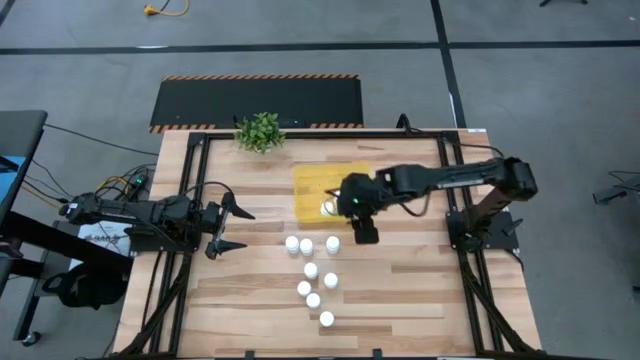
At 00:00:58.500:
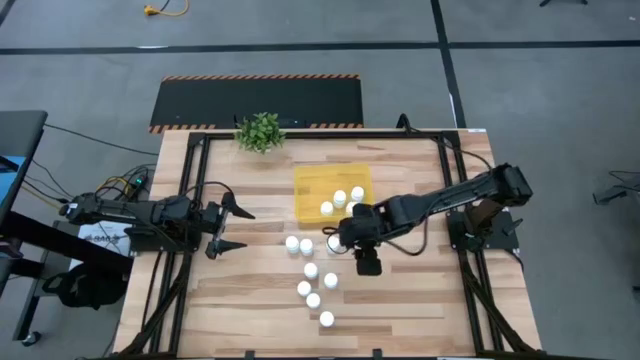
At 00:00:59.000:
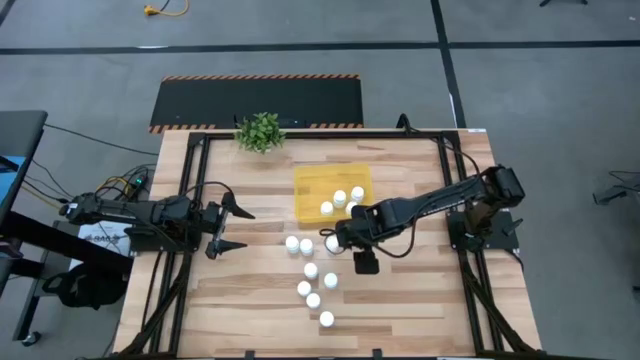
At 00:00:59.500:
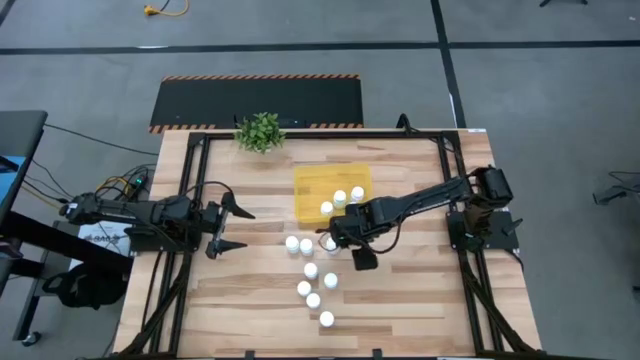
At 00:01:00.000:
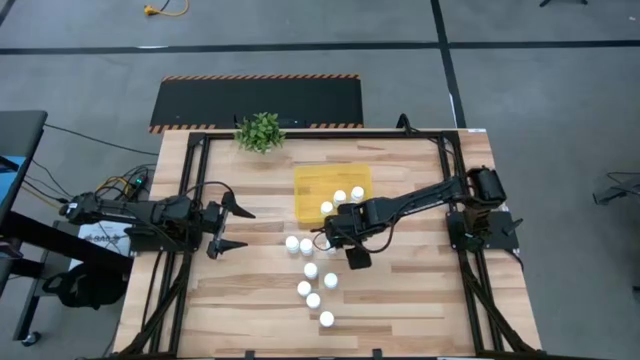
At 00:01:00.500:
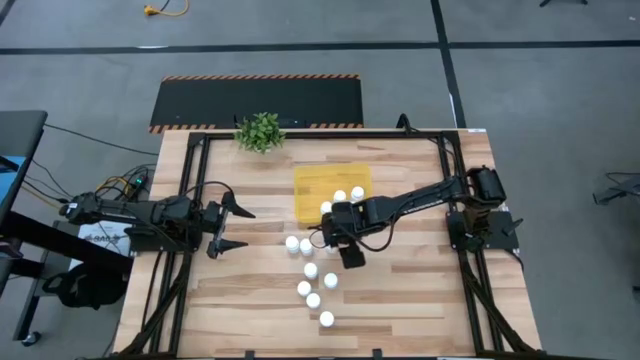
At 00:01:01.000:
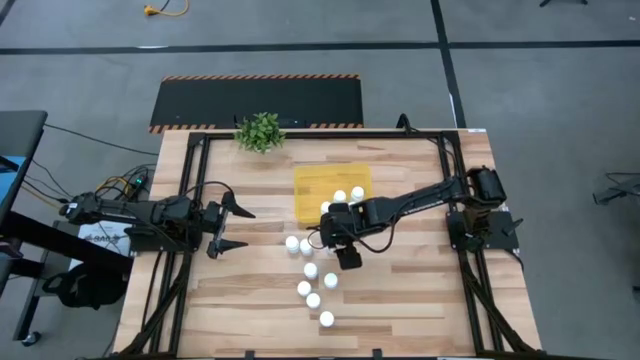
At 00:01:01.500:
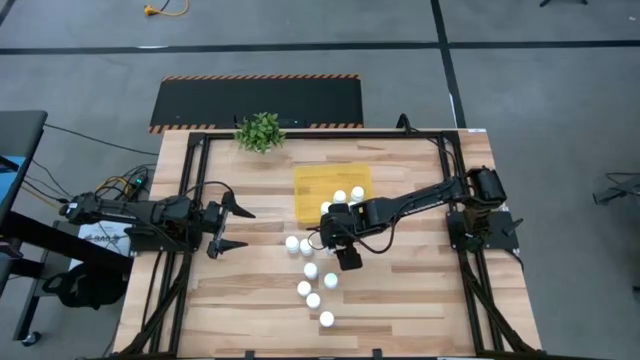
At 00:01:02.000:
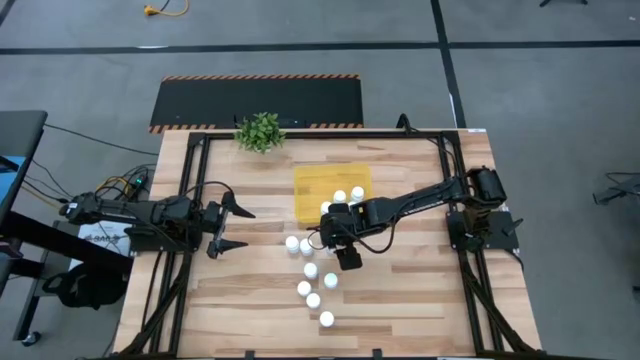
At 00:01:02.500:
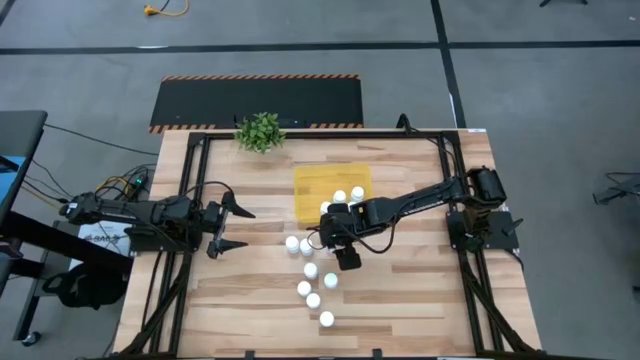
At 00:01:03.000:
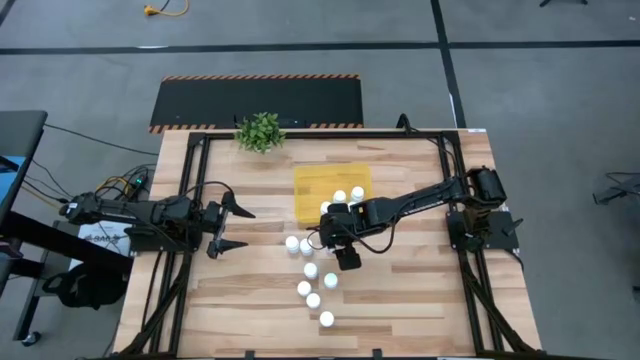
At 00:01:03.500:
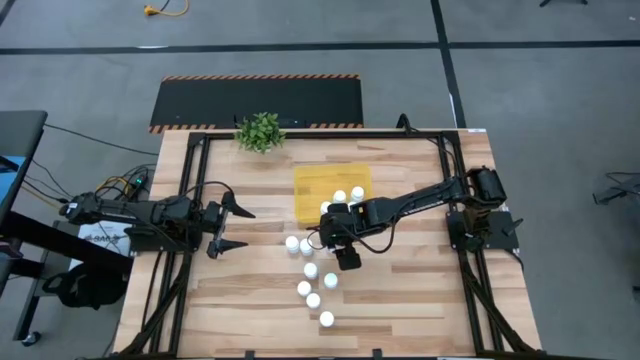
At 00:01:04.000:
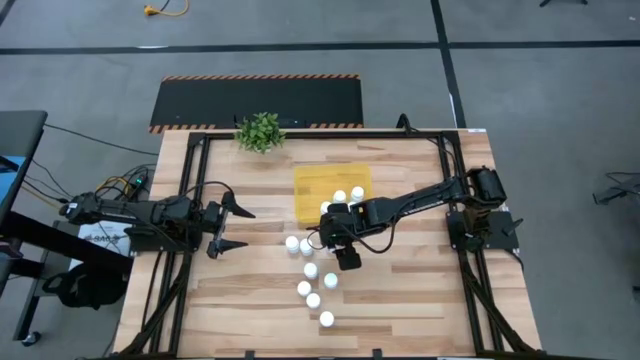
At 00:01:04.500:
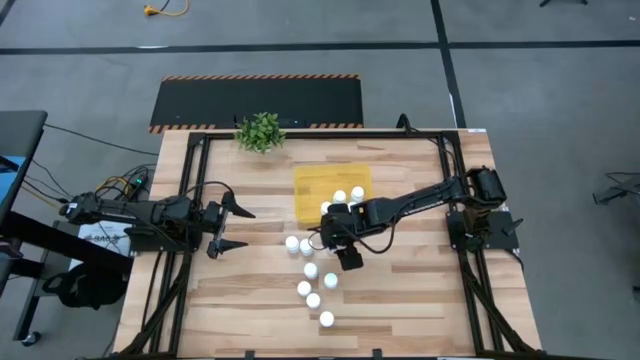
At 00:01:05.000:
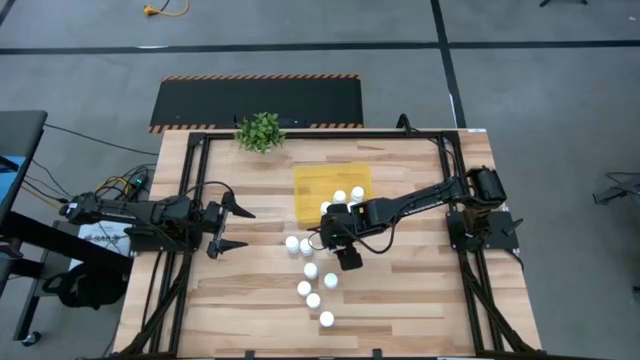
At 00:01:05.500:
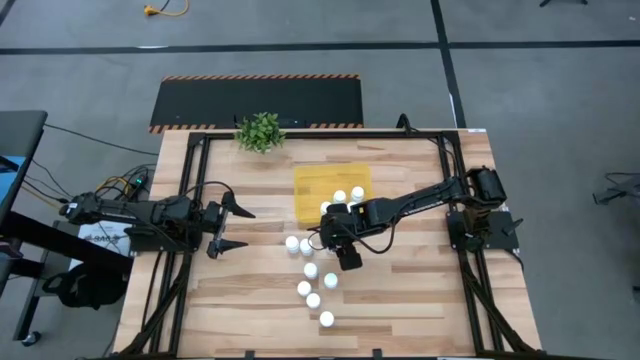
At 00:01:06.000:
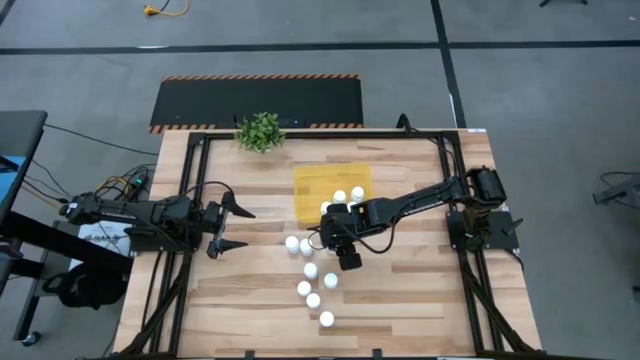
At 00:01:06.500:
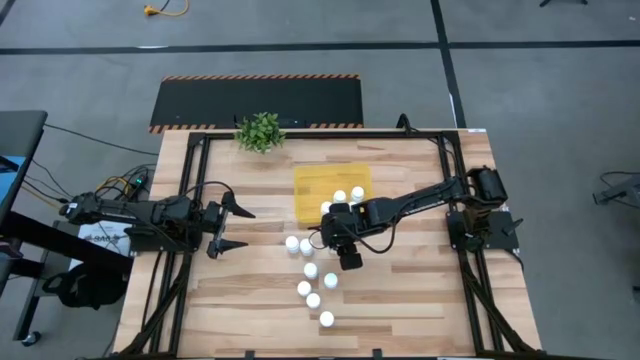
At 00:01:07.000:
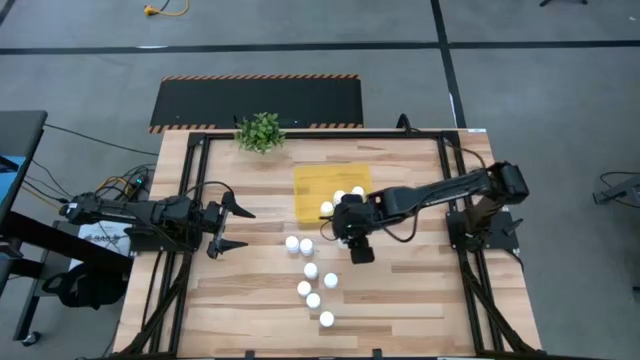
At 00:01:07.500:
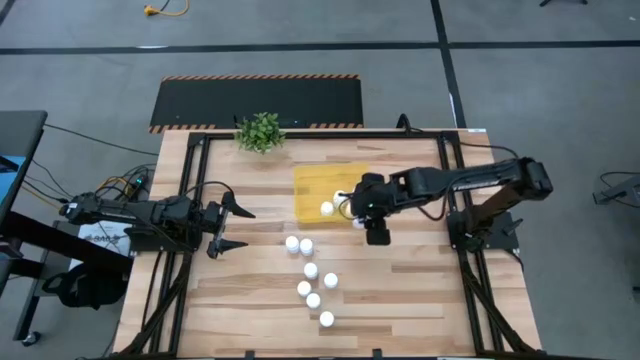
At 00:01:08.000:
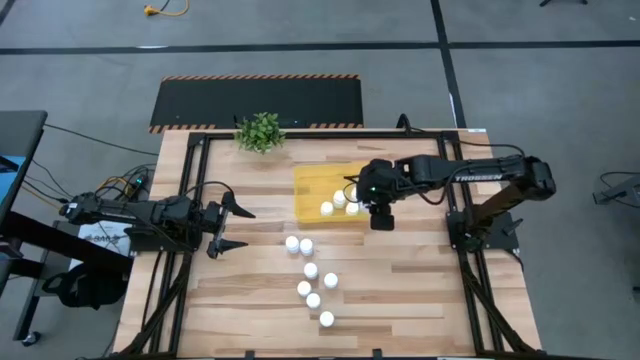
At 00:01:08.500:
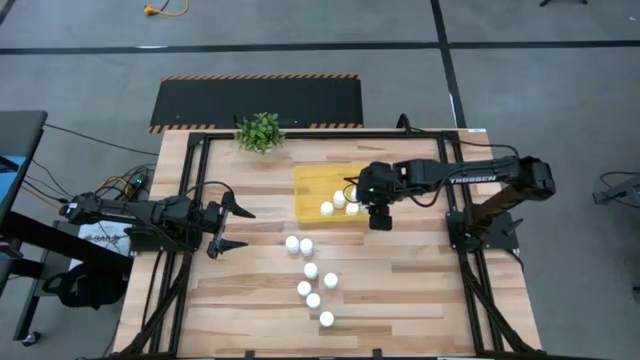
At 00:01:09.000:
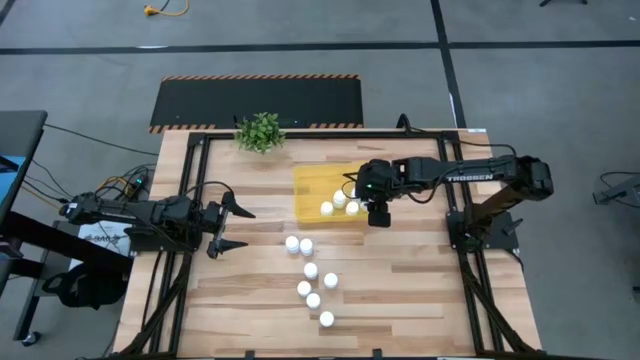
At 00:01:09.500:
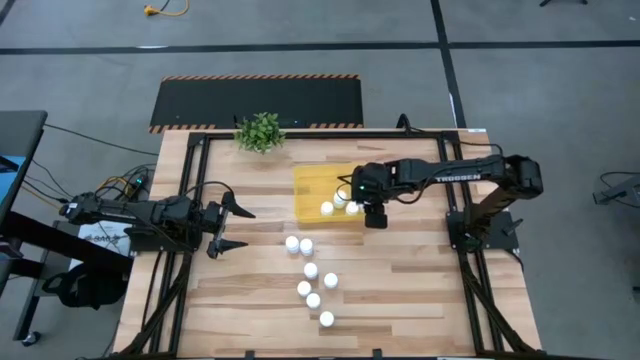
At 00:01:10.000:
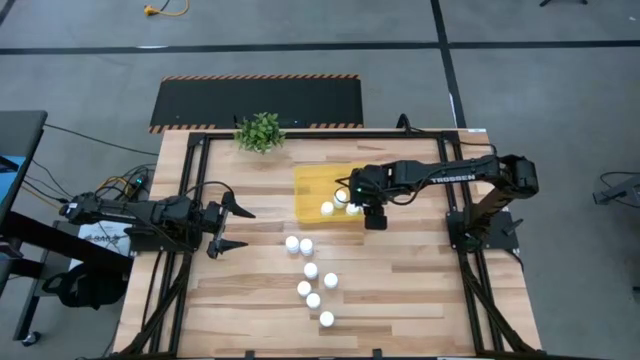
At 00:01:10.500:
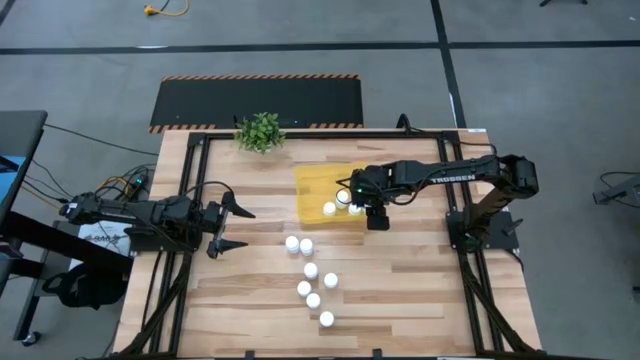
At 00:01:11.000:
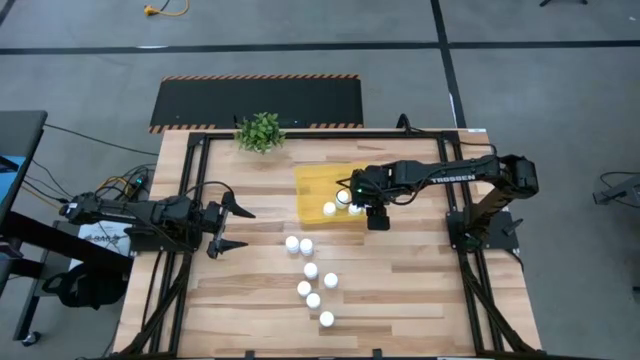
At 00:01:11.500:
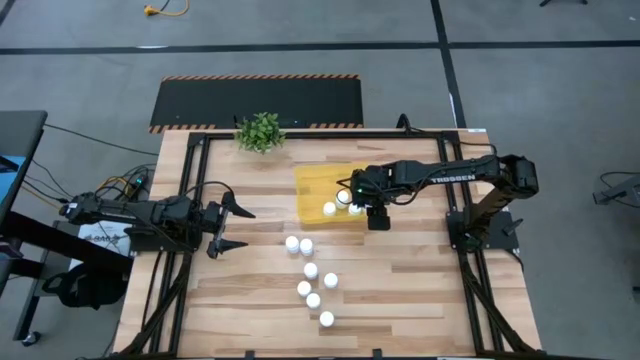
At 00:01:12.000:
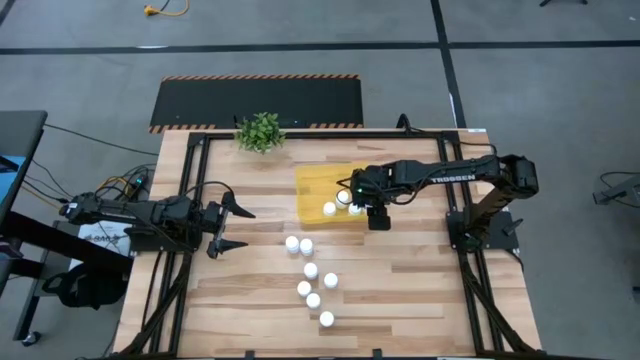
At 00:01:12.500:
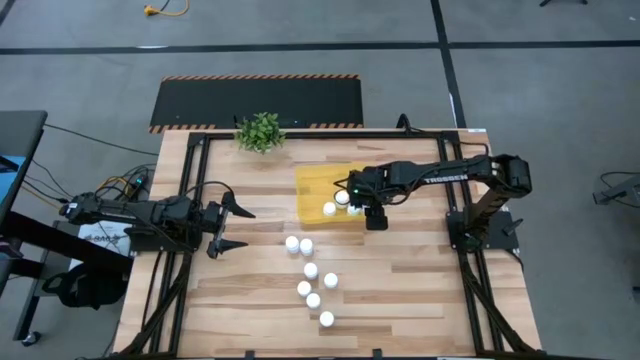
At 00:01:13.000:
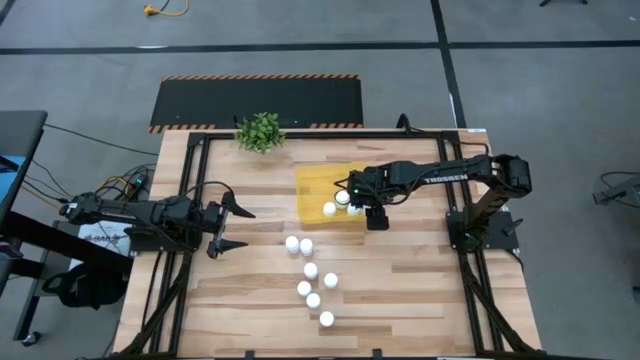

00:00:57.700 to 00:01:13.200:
Task: Pick and place pill bottles into a basket
Put the white medicine bottle into the yellow bin

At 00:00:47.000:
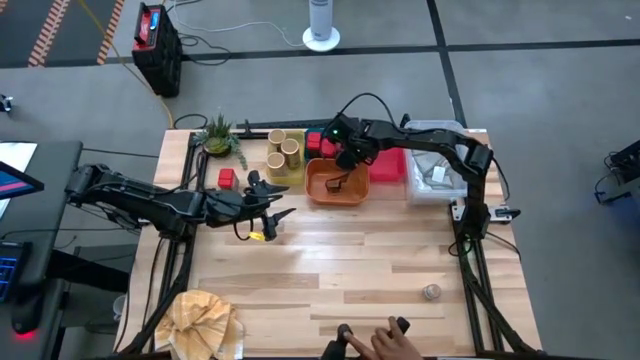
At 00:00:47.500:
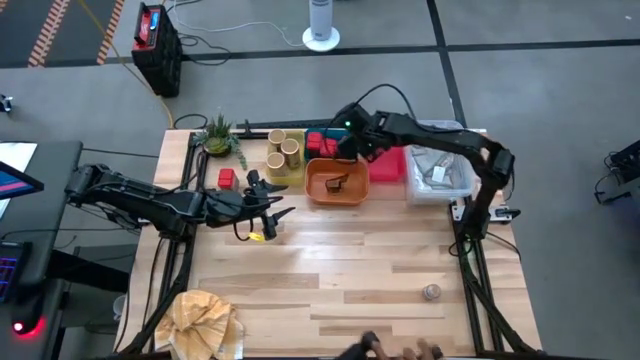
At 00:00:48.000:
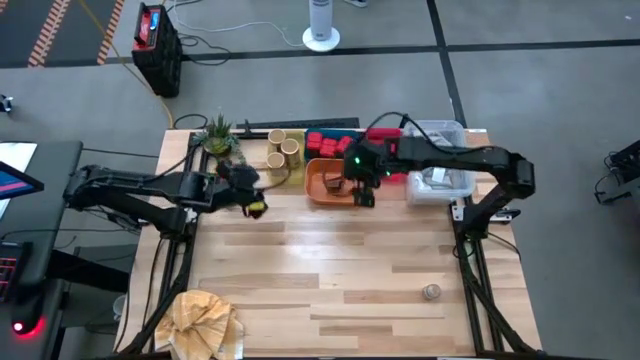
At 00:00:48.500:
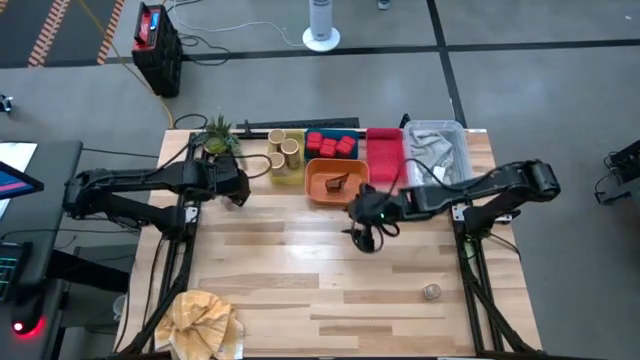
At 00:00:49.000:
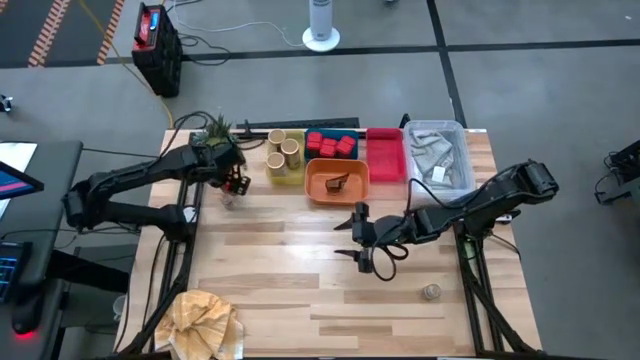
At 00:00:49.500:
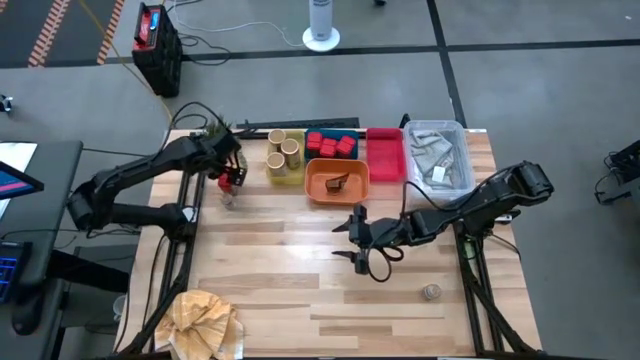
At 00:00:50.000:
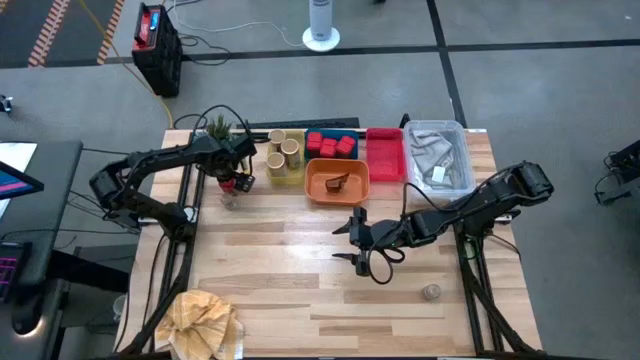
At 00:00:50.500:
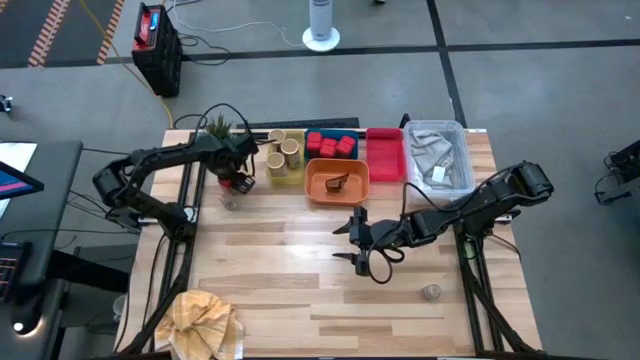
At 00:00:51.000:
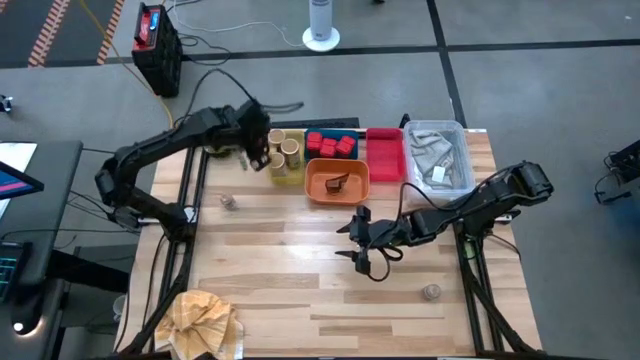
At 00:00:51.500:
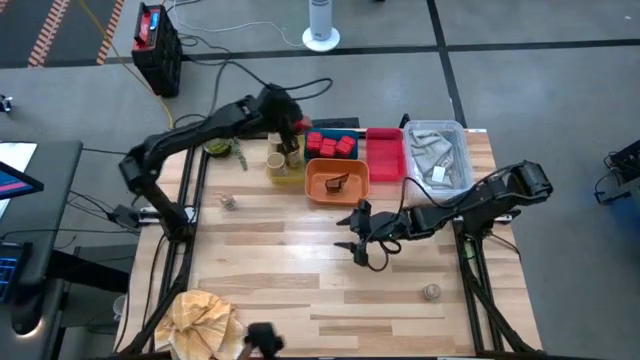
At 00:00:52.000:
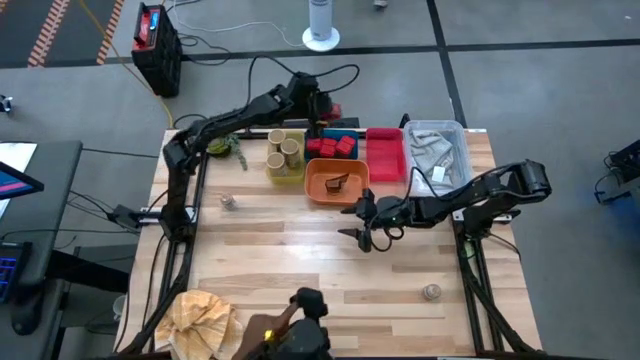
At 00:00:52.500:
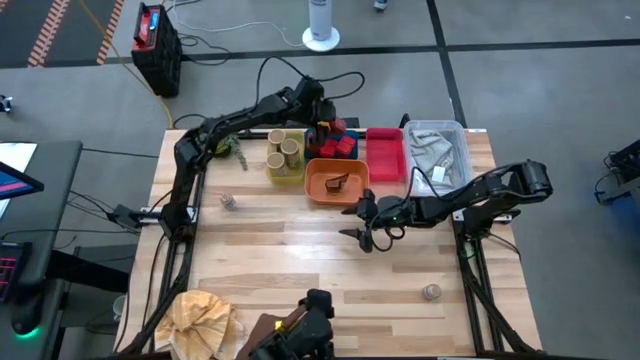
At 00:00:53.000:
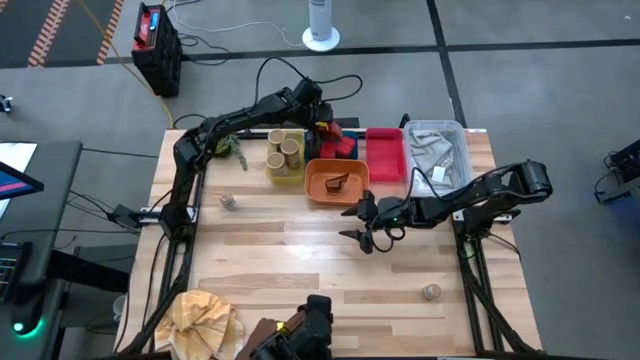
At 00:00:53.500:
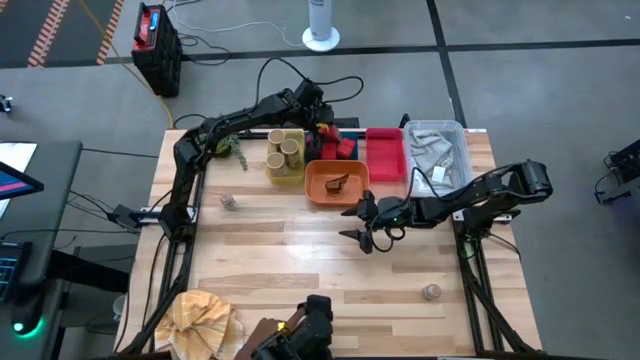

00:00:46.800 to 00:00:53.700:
Task: Sort spices by type
Put the top left red seasoning can into the blue bin
